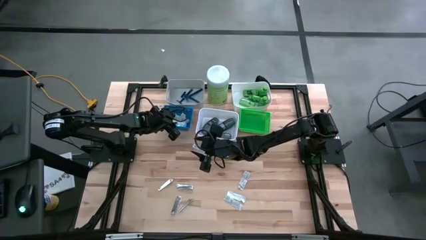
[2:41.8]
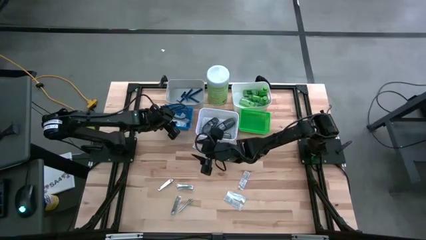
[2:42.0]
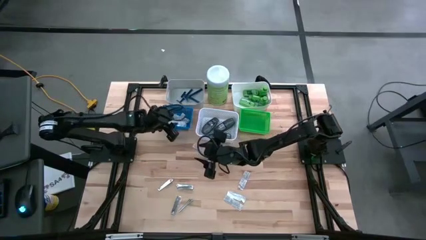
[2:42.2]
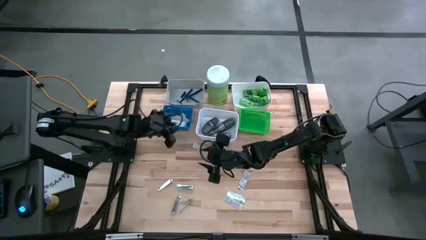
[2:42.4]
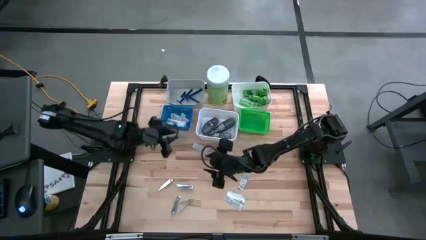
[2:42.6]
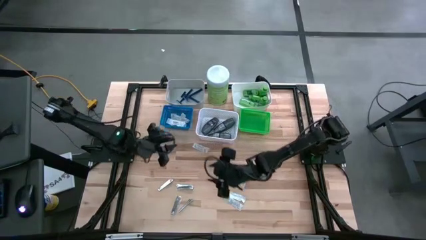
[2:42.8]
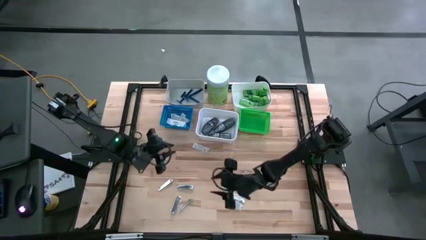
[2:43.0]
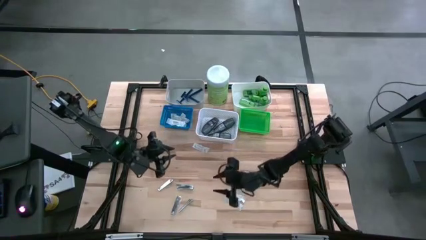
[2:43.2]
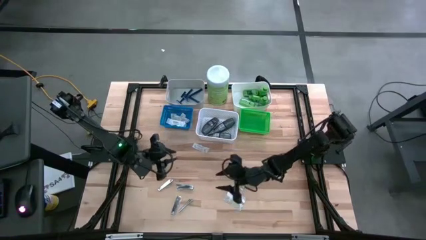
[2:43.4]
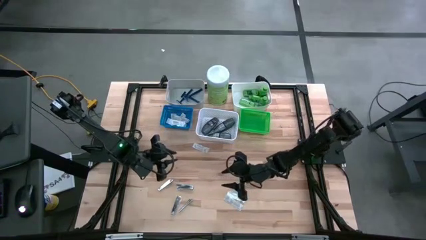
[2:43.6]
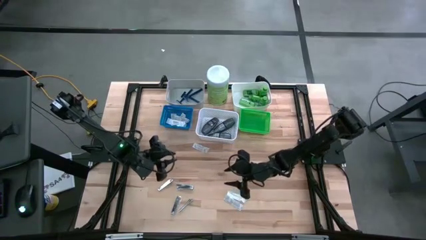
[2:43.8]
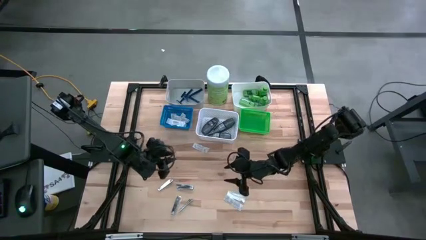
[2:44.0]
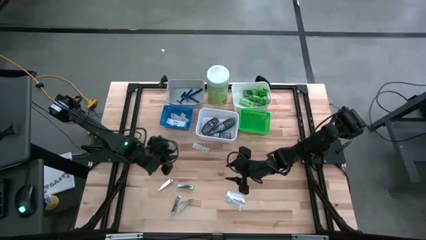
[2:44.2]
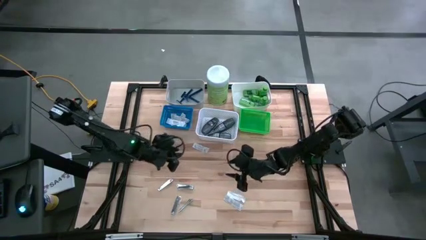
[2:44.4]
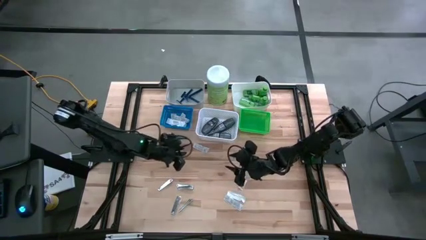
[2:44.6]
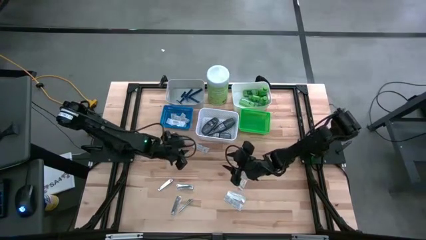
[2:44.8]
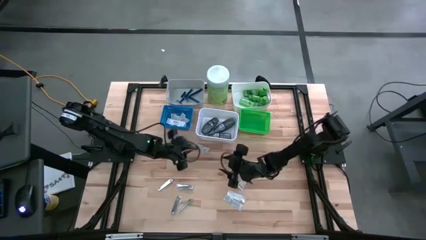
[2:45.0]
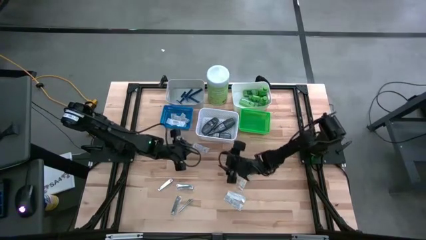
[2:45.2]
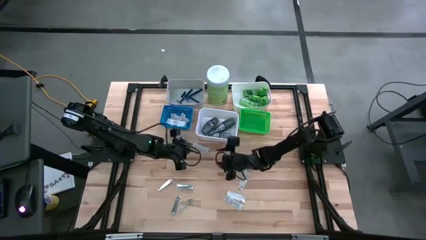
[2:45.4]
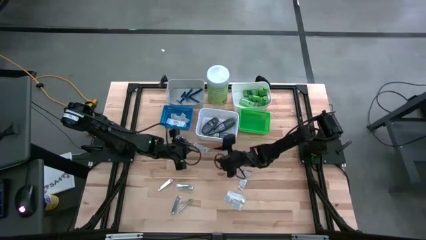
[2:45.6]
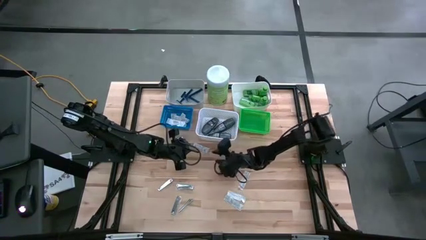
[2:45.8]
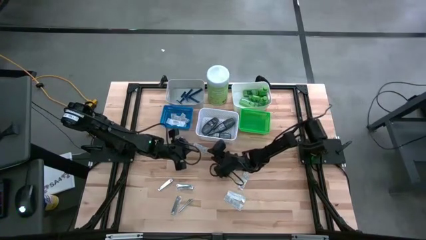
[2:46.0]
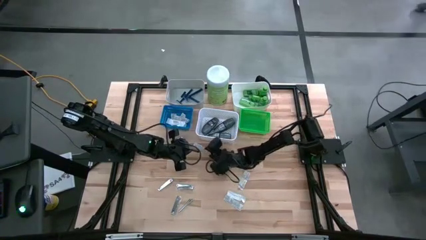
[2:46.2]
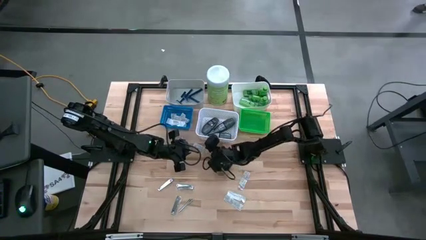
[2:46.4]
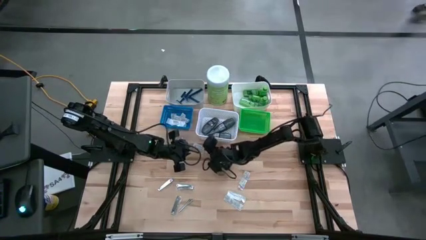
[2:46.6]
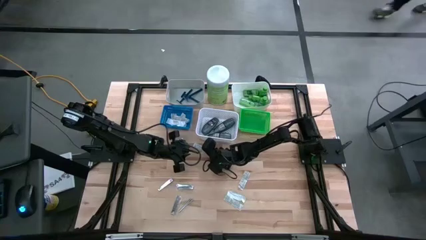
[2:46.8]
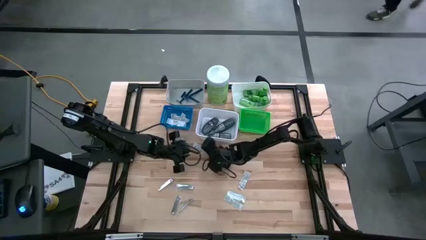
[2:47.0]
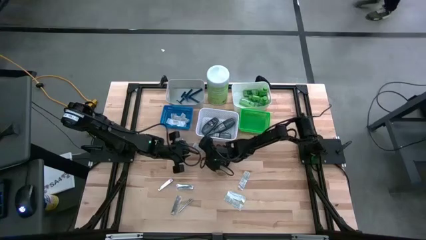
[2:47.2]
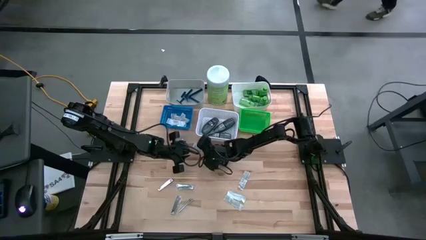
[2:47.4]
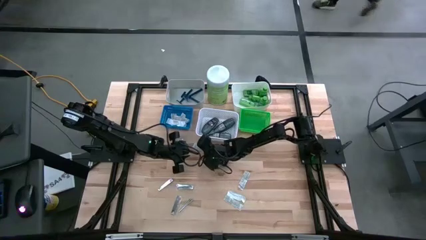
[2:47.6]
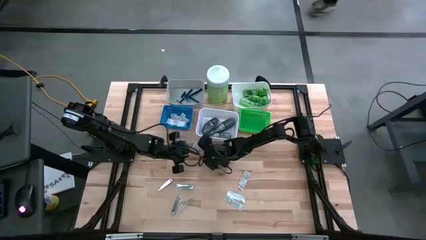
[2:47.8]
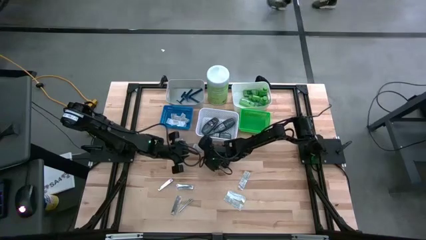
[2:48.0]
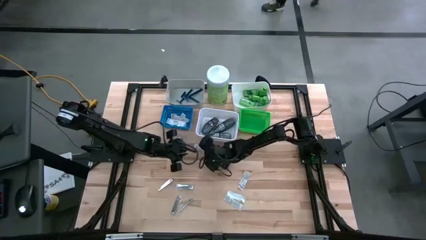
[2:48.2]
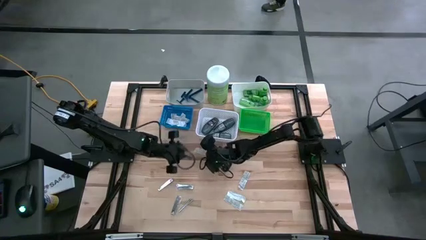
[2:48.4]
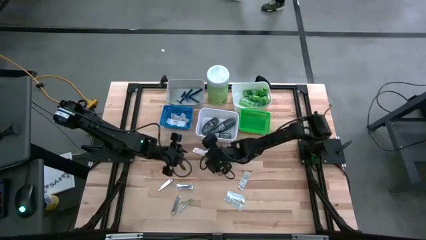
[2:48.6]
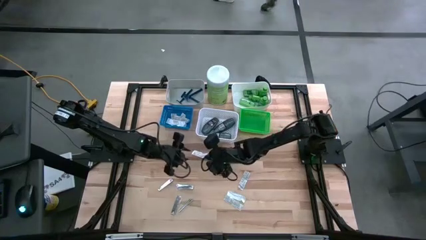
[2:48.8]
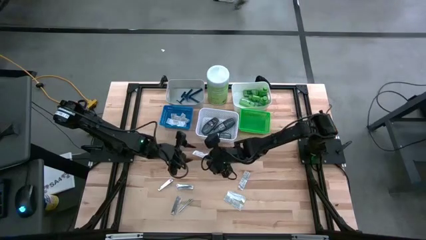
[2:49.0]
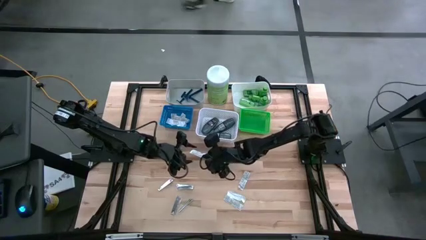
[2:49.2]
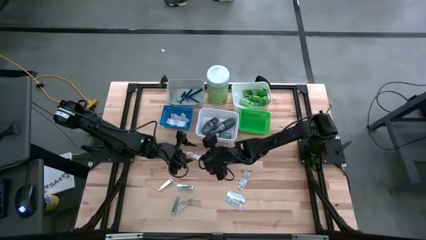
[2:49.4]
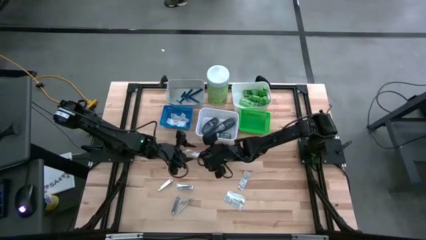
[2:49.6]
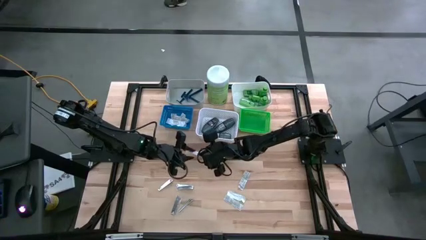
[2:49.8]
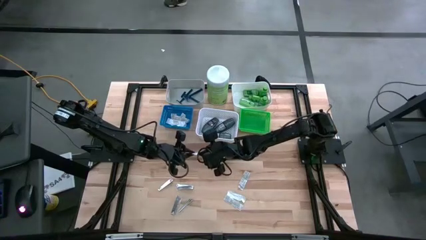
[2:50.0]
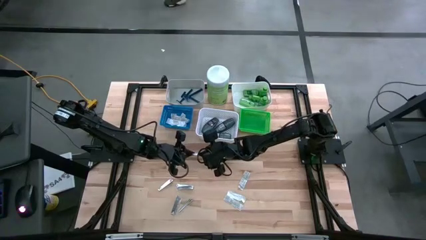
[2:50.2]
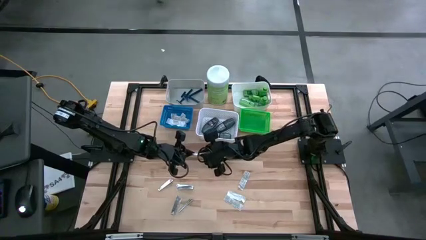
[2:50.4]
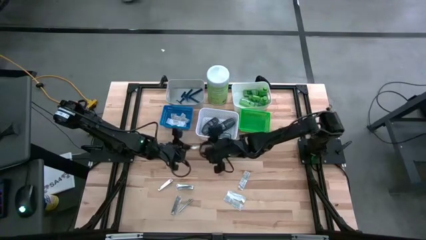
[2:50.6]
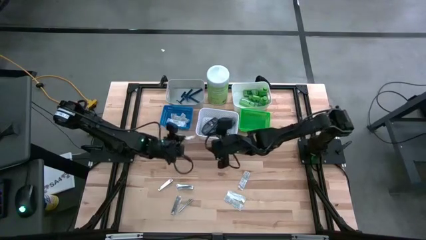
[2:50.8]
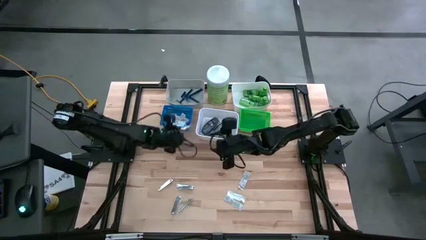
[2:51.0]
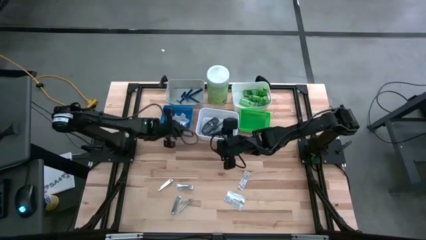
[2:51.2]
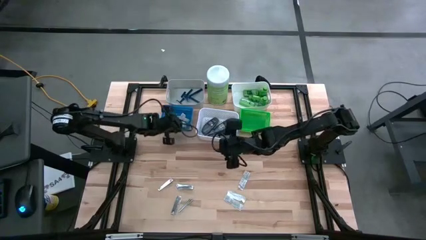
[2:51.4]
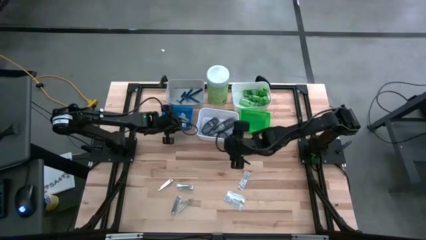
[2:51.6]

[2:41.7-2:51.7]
Task: Pick & Place Travel size toiletries
Put the white bandage into the blue bin

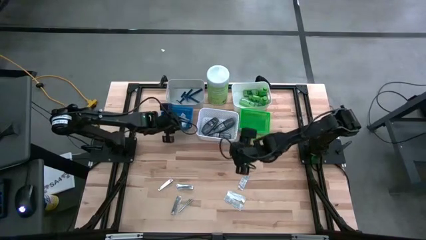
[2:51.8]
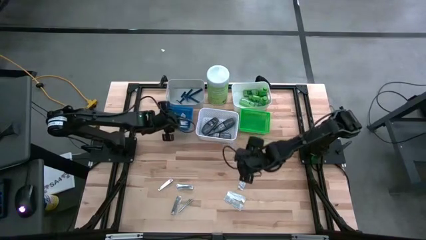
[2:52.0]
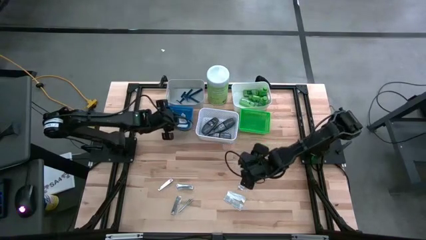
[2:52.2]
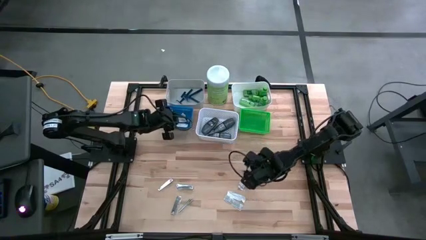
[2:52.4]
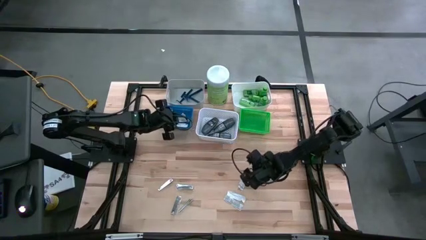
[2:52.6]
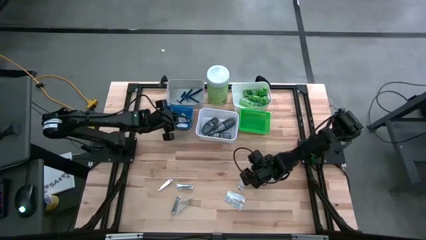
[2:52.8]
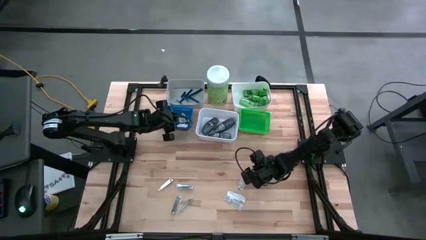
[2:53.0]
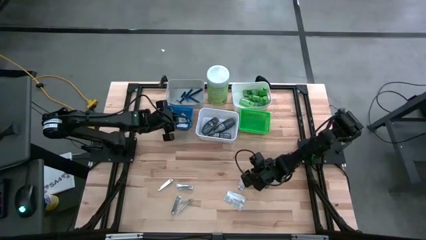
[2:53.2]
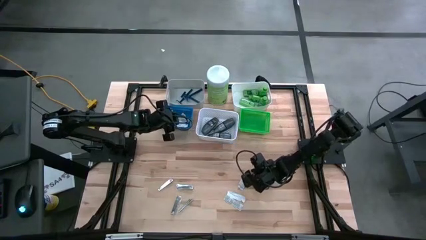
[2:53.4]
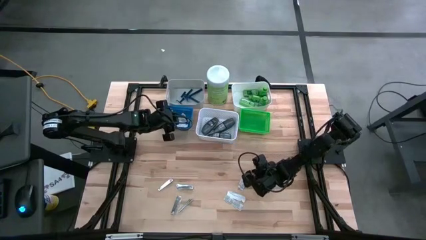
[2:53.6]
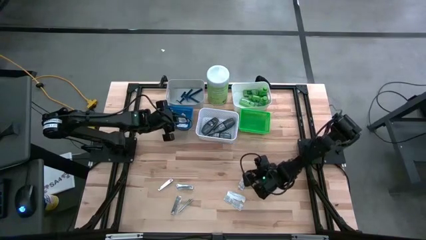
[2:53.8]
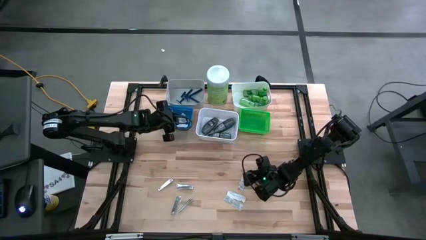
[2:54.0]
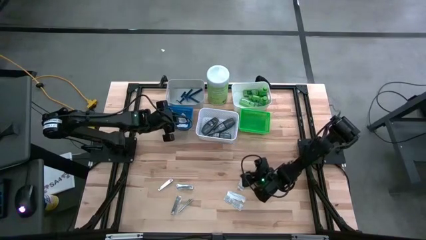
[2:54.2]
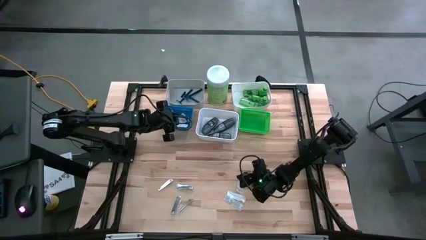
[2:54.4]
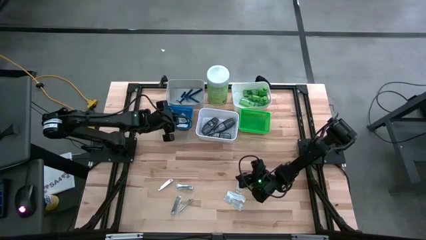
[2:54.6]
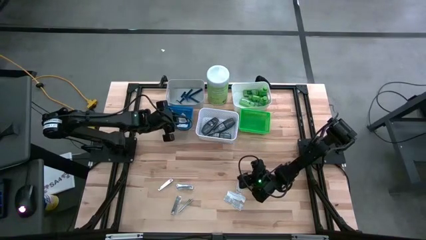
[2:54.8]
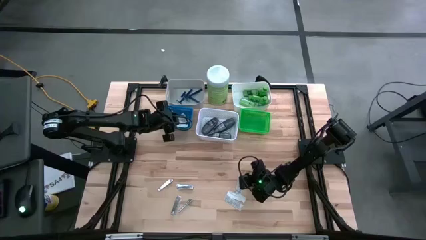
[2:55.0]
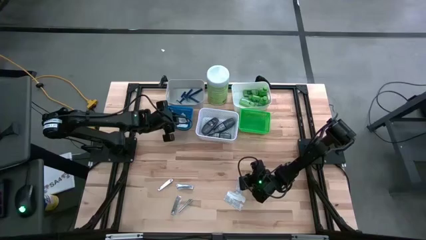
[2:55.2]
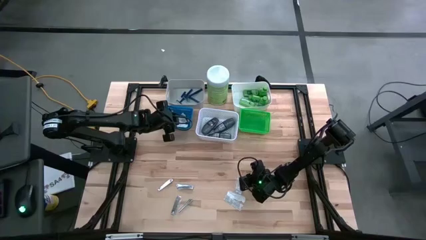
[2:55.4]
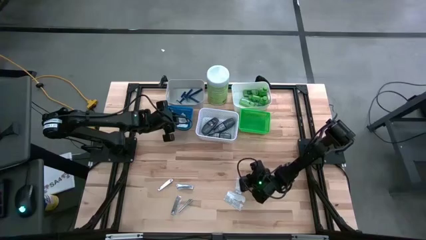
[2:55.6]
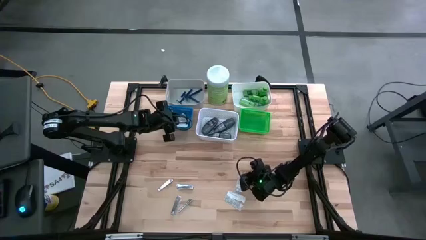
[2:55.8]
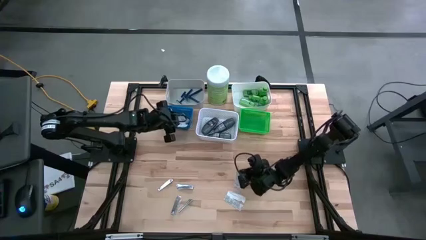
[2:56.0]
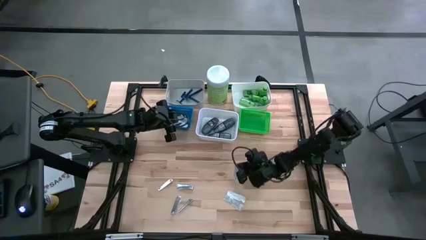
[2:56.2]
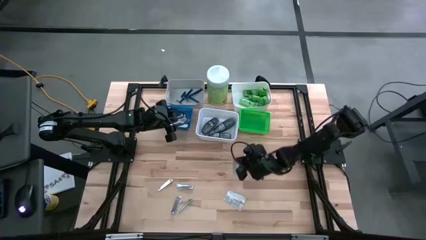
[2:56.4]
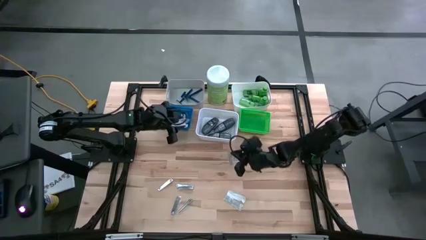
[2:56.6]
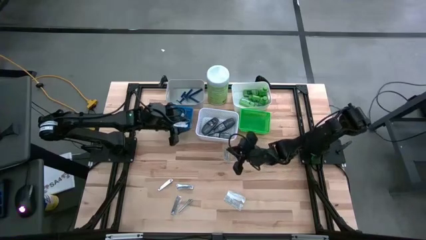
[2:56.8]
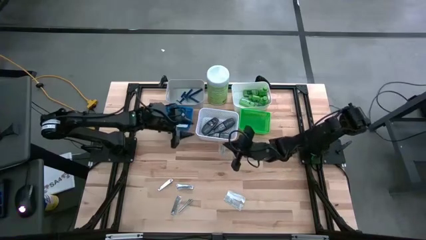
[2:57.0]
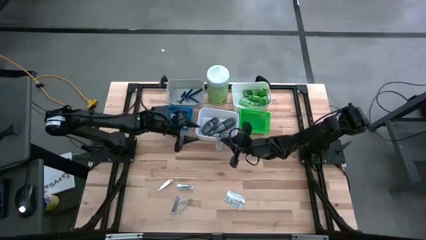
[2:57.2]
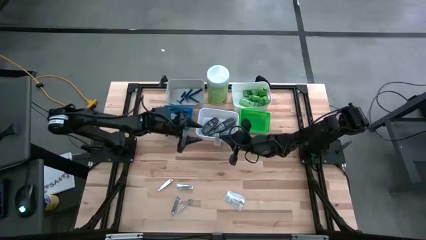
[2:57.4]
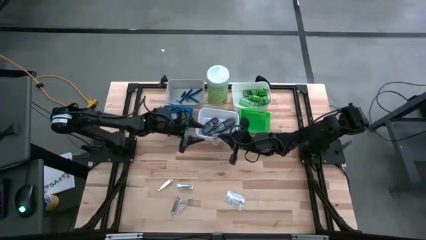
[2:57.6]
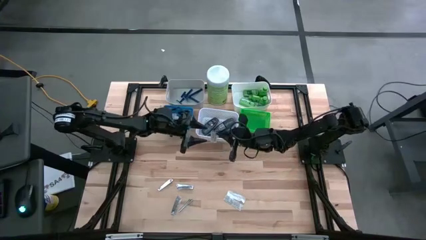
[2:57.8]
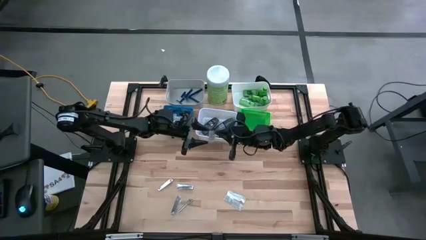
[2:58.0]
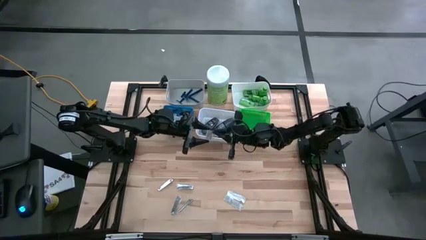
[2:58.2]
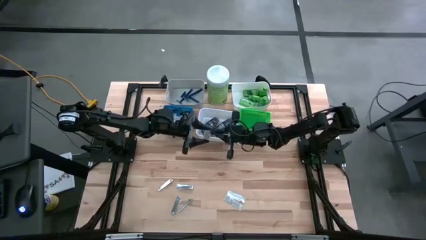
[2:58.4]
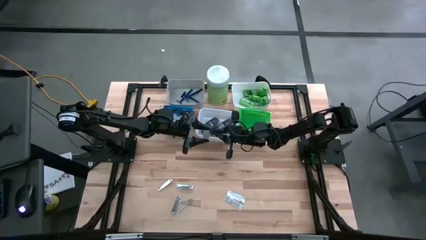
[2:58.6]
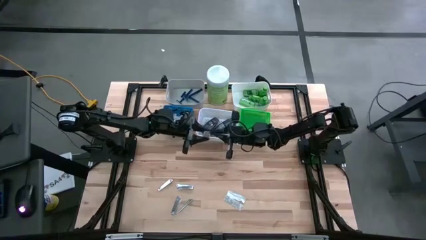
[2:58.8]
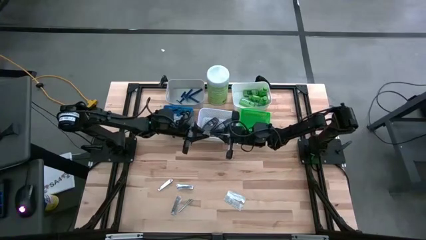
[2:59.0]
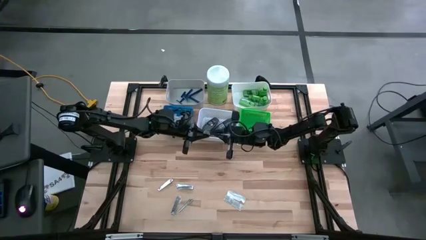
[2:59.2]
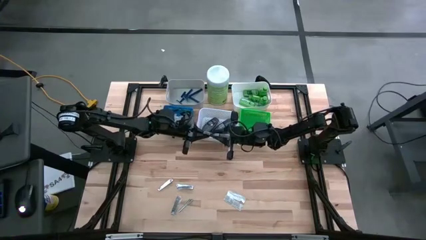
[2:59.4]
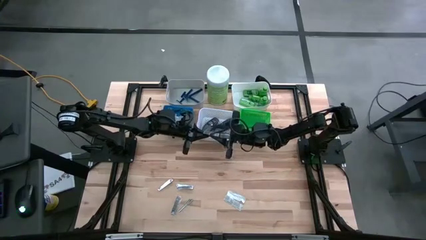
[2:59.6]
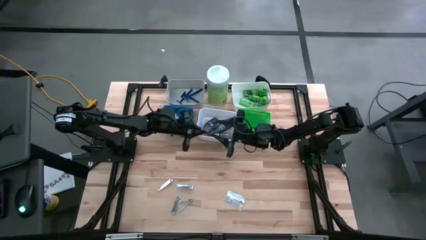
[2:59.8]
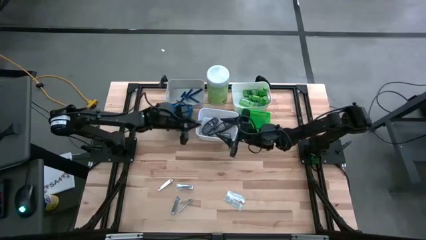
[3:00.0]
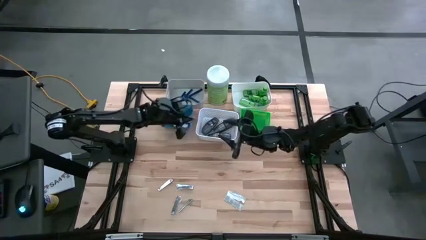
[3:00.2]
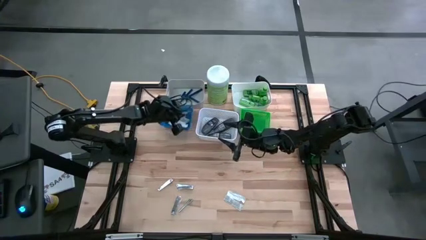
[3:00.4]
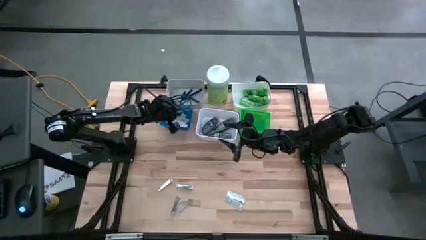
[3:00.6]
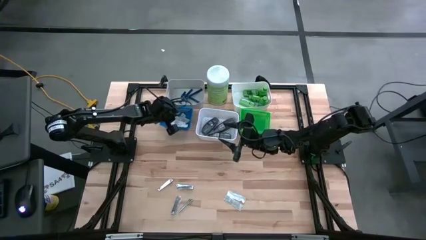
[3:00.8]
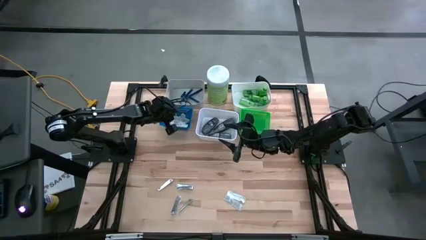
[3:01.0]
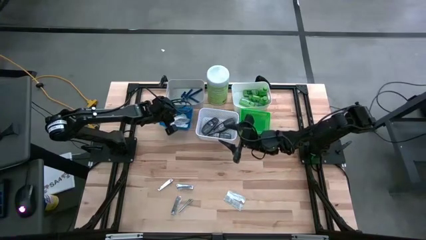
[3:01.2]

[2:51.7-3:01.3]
Put the white bandage into the blue bin
